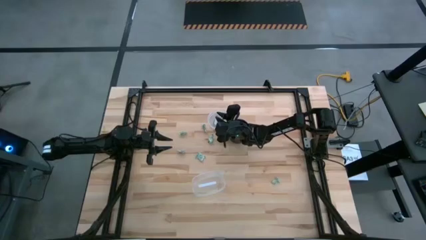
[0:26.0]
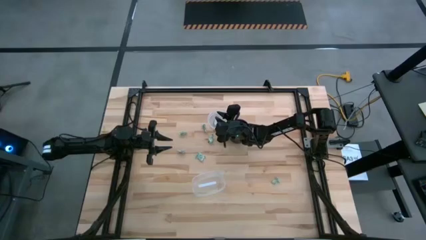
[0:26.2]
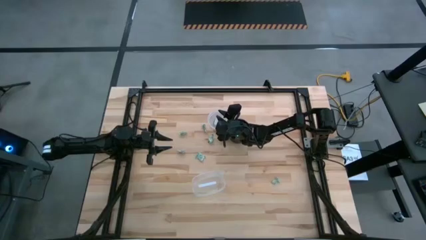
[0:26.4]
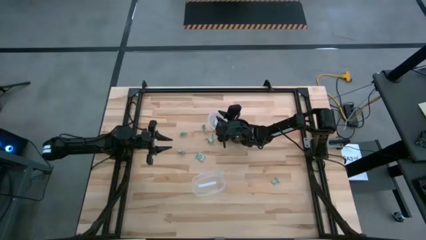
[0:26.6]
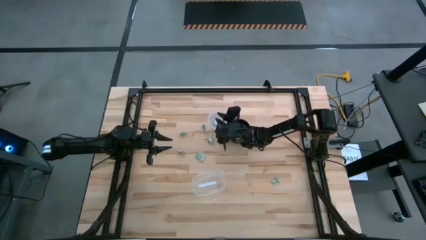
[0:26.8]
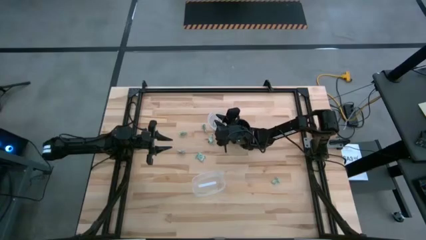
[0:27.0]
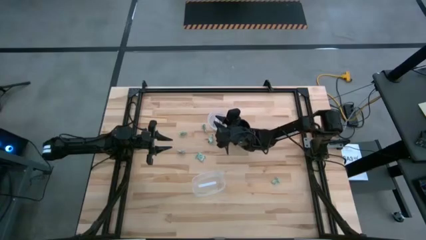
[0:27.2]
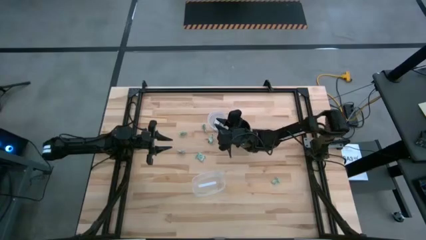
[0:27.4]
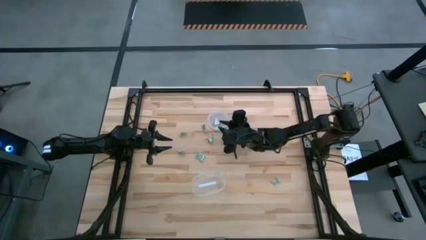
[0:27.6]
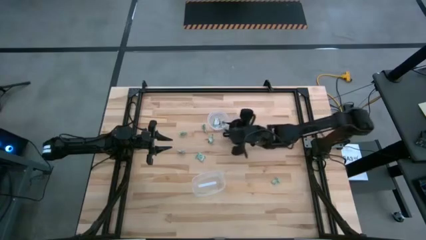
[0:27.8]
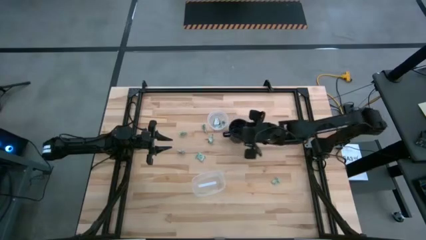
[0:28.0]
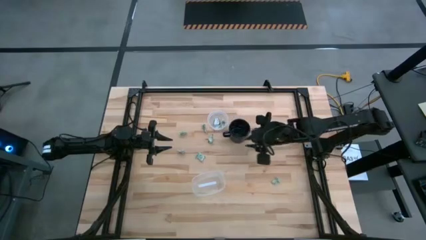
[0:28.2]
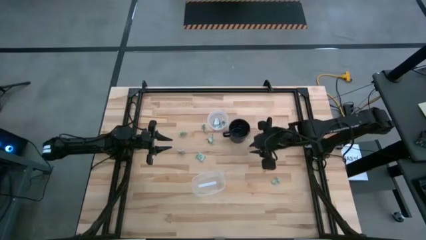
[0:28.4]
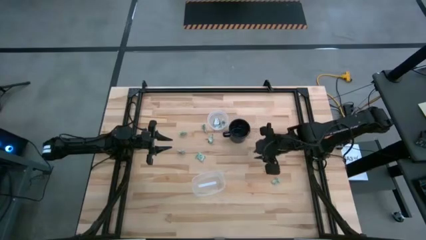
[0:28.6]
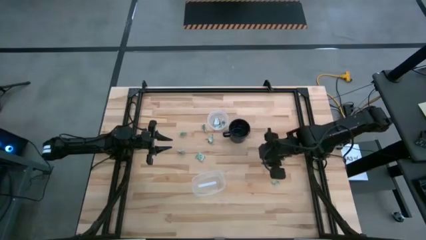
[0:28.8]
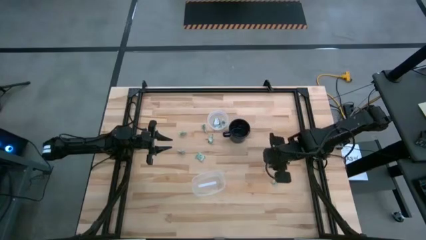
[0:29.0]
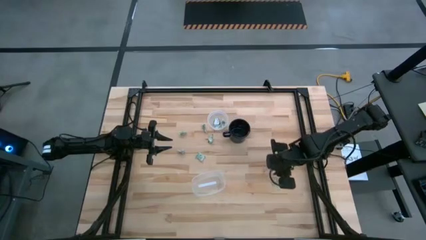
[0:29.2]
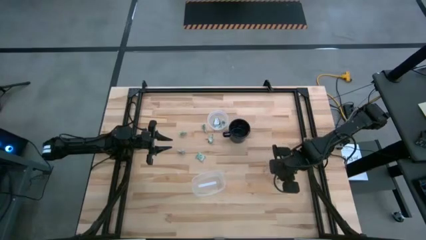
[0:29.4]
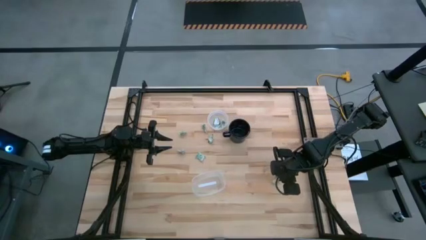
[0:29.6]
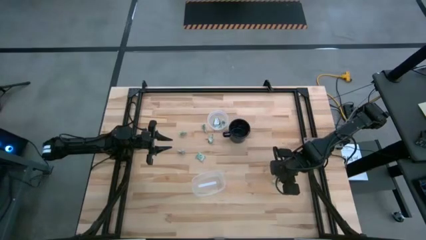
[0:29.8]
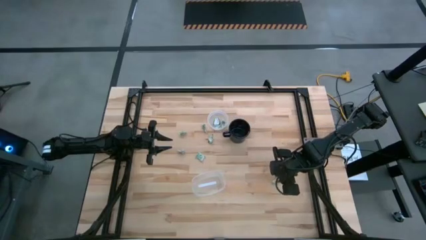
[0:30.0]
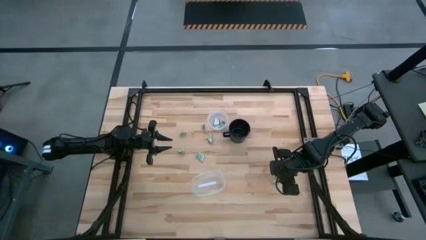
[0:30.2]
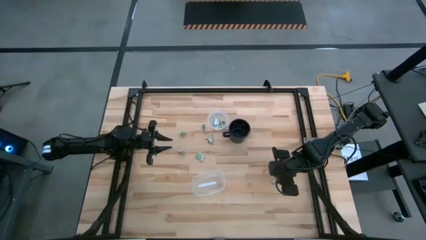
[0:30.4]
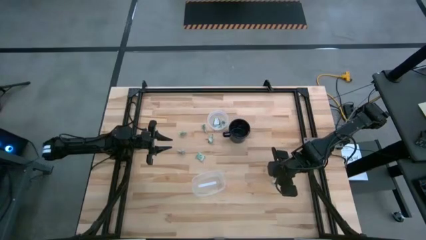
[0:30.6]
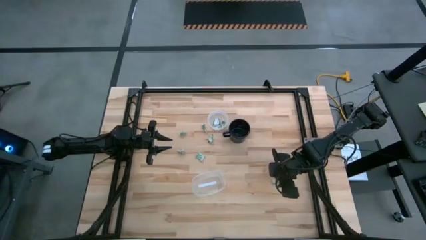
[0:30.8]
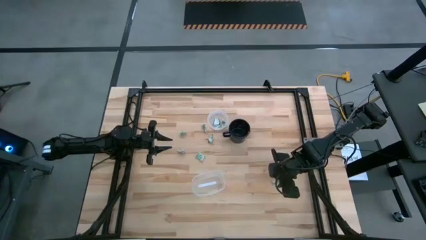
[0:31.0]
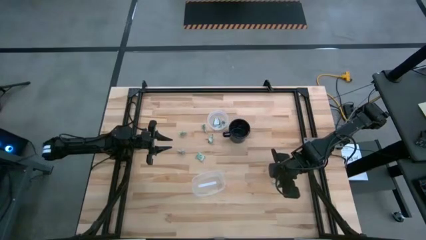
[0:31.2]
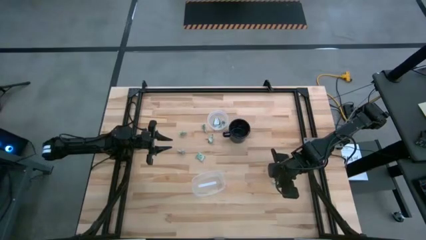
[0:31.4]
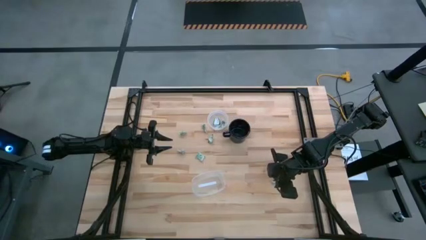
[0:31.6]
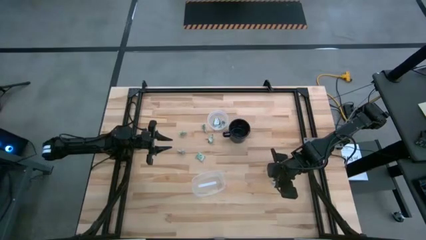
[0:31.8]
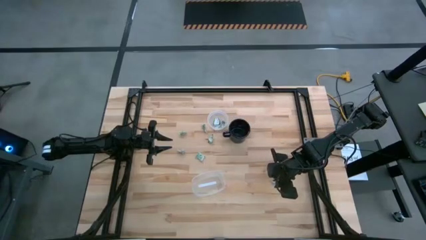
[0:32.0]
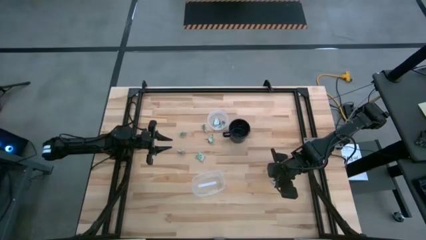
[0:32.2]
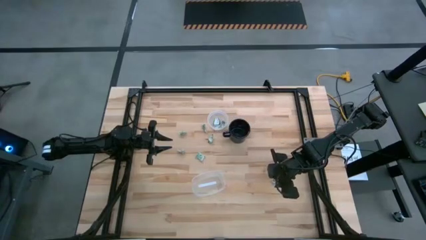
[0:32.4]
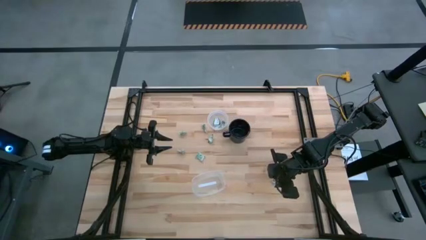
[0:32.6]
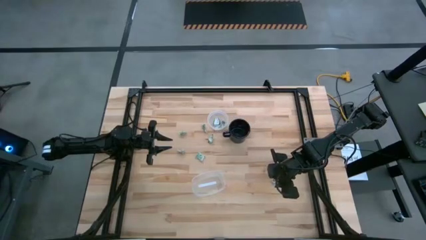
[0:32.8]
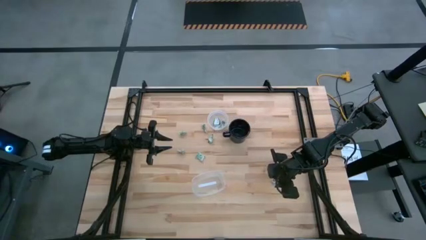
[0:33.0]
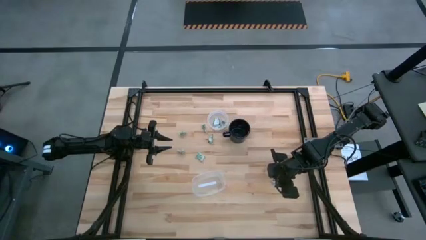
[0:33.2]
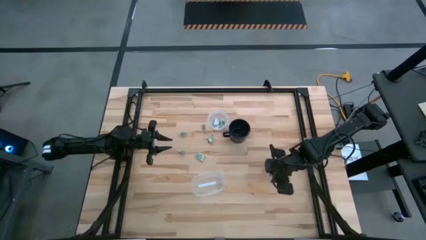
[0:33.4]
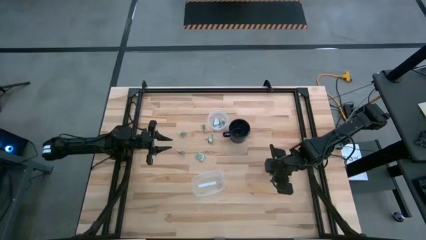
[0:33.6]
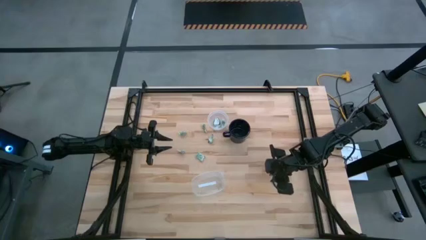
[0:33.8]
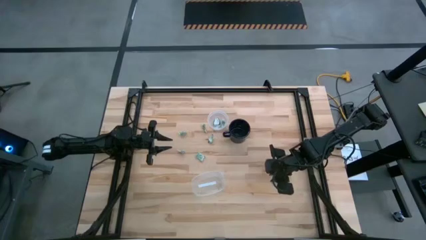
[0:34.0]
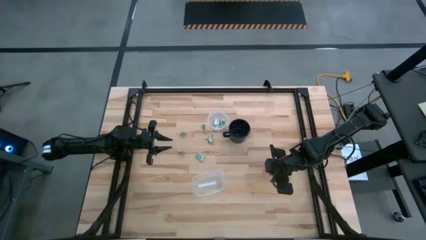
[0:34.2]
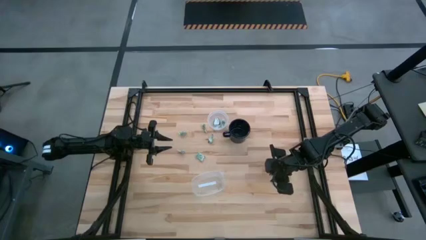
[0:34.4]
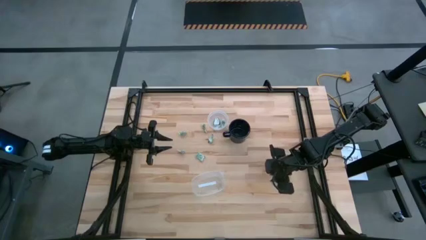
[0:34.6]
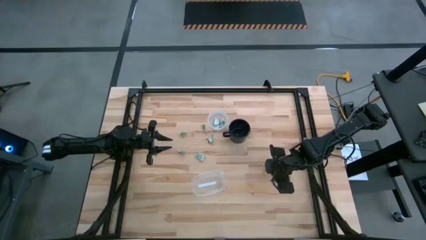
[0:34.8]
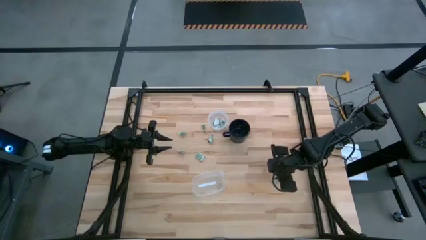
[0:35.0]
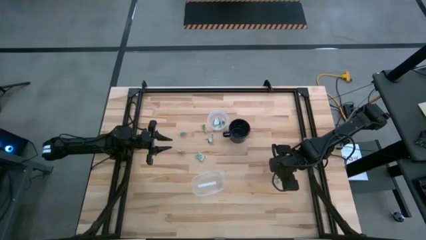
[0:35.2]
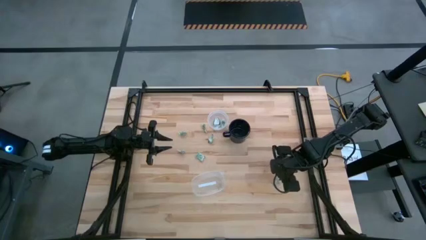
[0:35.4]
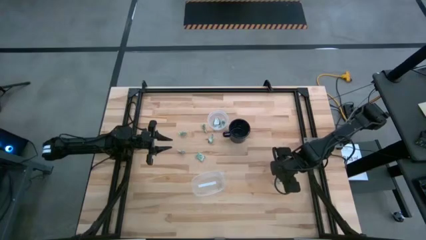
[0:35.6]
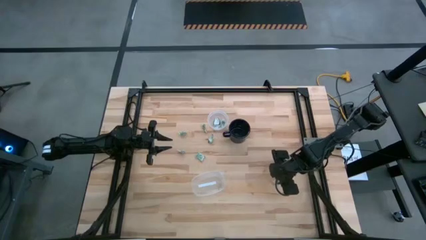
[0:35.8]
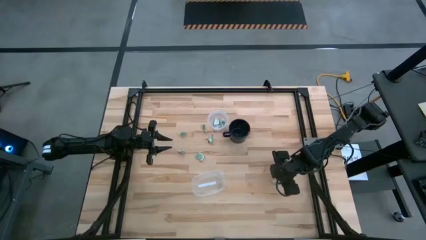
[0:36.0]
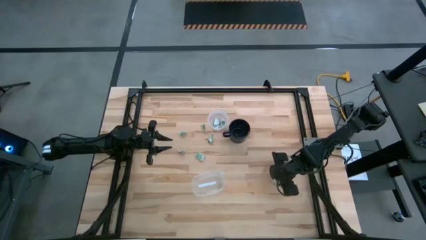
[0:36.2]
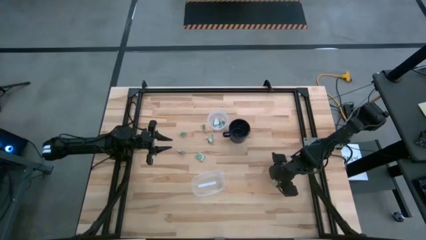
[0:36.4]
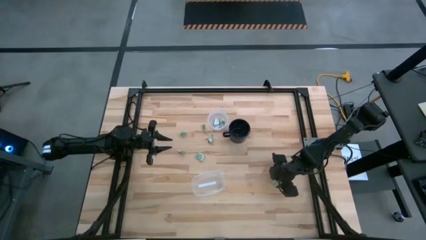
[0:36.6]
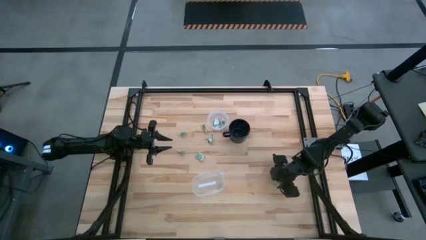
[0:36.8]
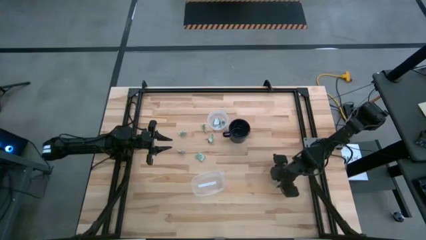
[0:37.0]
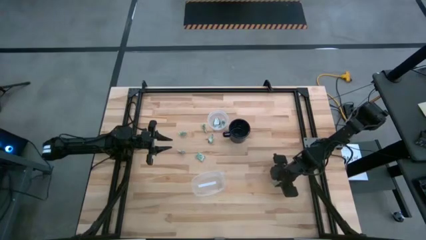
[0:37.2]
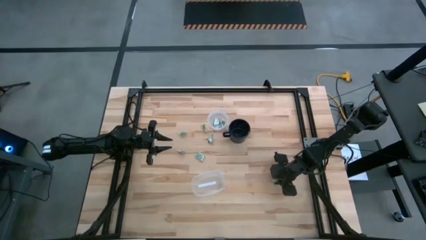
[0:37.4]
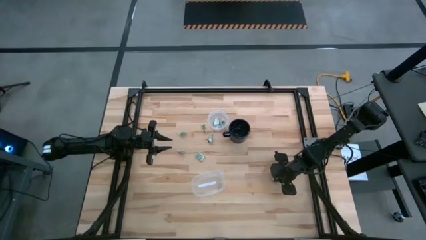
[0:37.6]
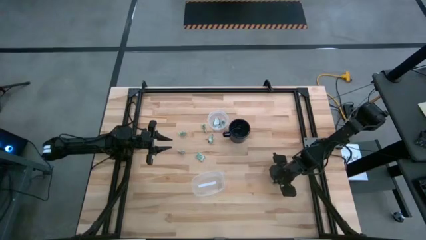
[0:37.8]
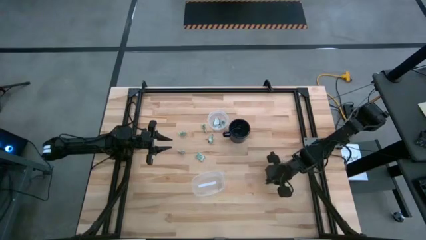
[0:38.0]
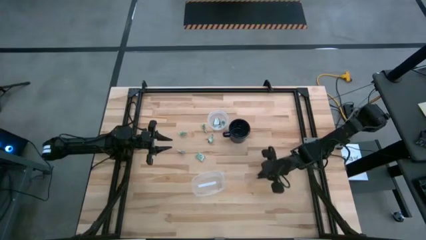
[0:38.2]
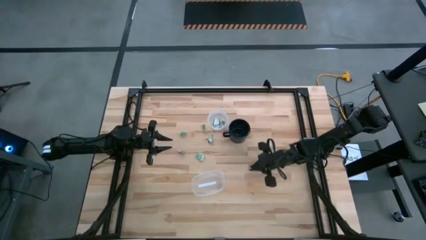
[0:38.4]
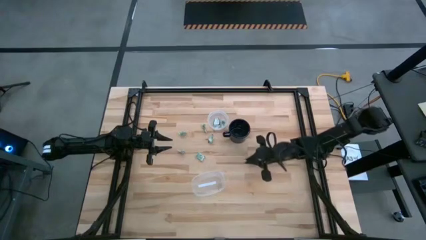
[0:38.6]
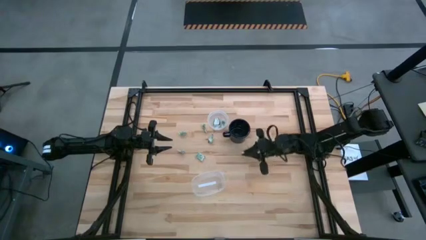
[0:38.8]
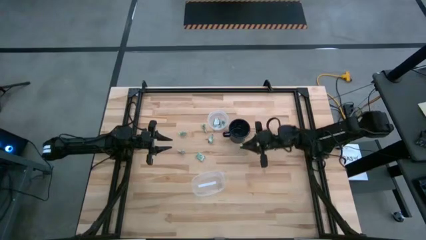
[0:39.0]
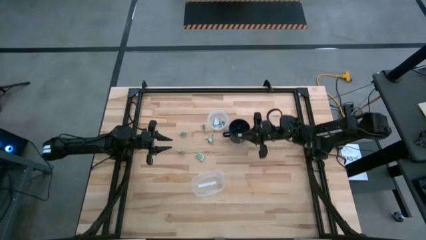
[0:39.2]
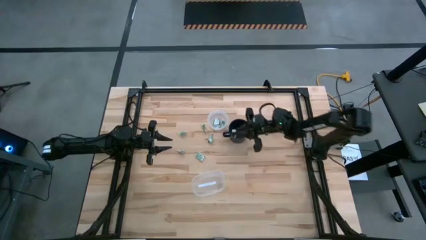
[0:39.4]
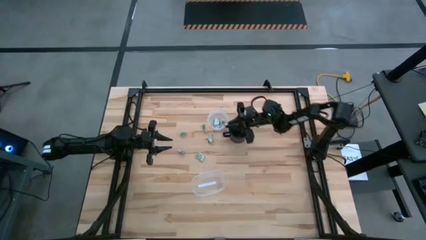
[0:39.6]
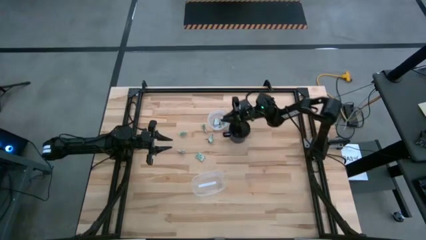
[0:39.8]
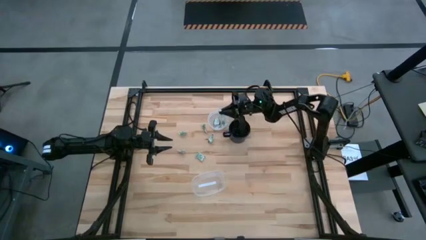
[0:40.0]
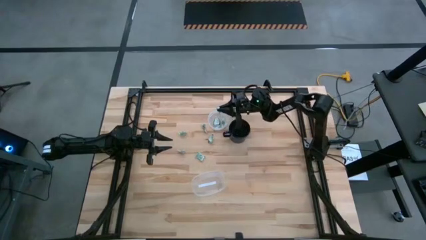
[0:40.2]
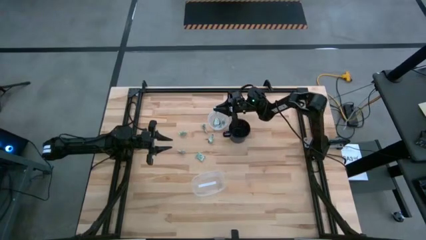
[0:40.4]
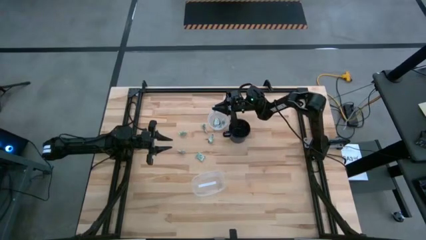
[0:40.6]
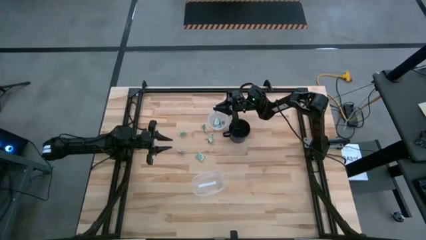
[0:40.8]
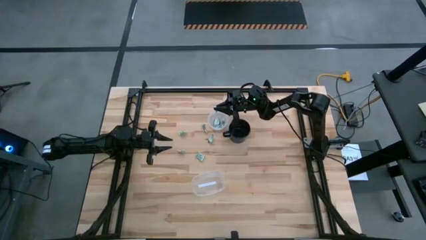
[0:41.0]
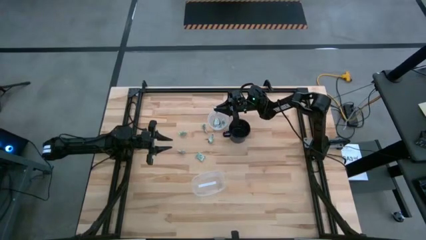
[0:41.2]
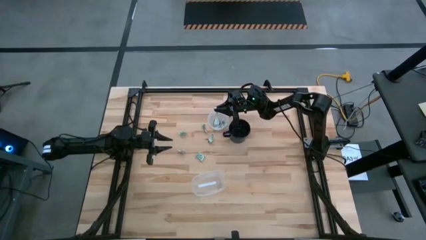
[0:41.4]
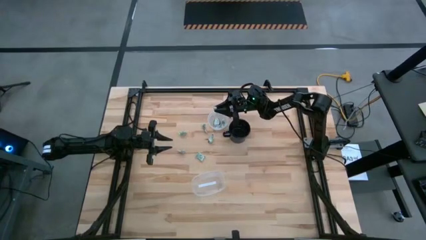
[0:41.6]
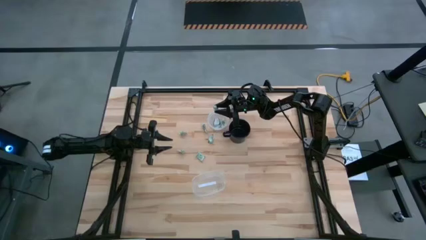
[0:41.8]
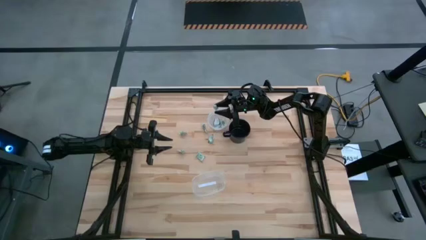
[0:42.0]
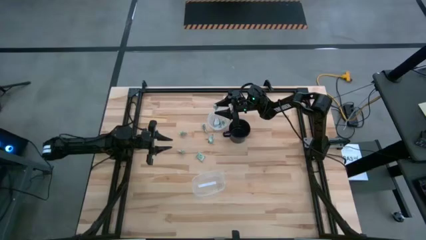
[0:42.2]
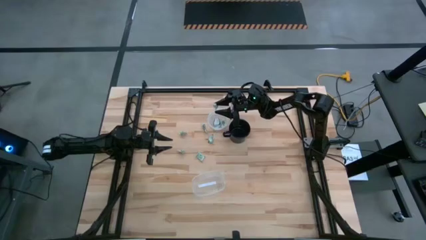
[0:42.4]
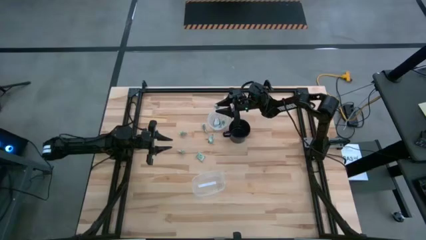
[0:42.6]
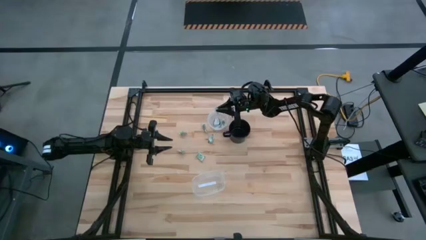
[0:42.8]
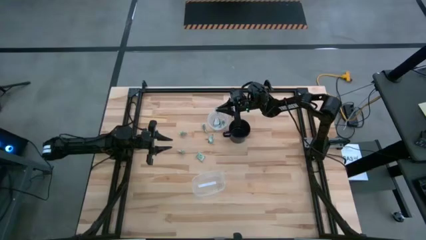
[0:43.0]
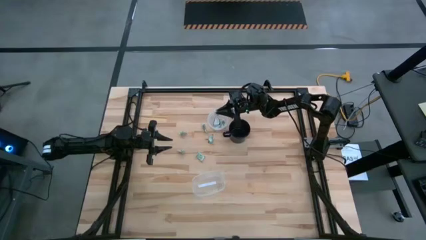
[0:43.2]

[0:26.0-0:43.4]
Task: Pick and place Stevia / Truvia into bins
Put the stevia packet into the top transparent container
